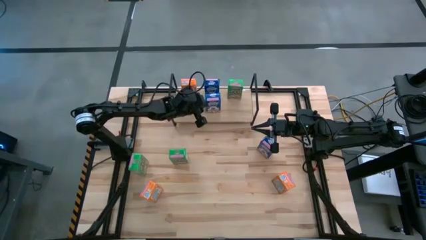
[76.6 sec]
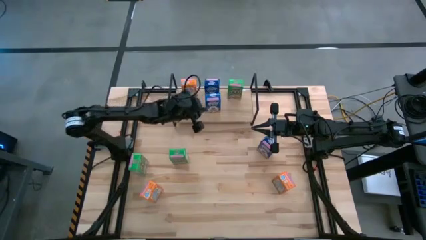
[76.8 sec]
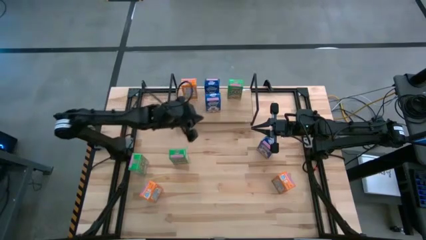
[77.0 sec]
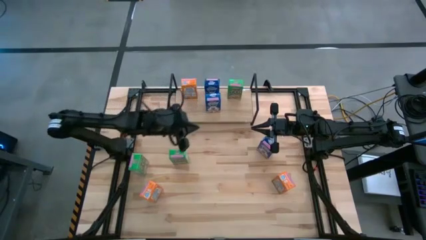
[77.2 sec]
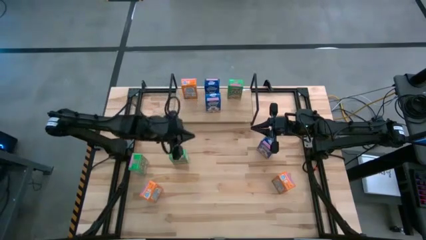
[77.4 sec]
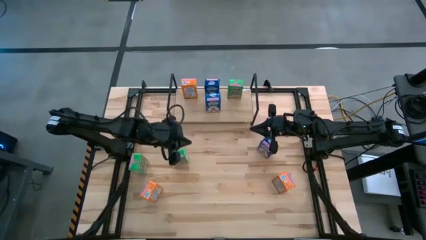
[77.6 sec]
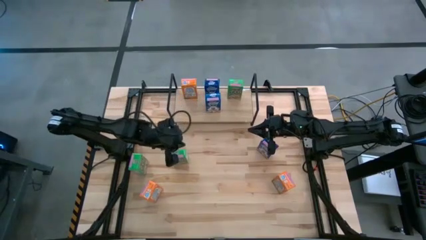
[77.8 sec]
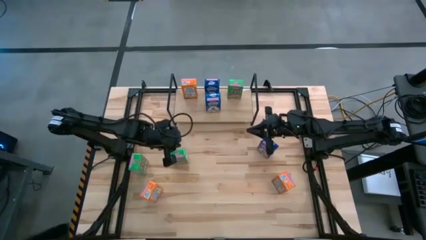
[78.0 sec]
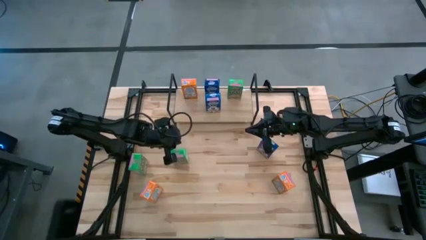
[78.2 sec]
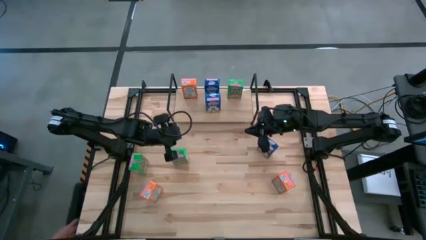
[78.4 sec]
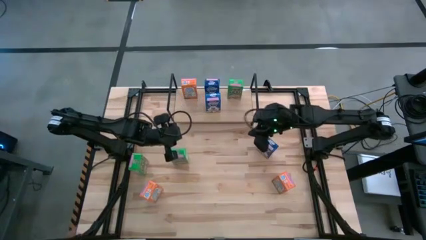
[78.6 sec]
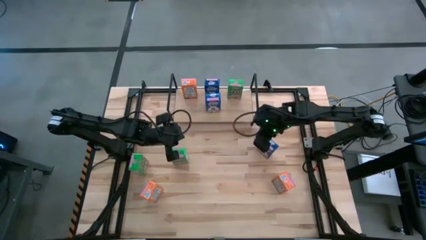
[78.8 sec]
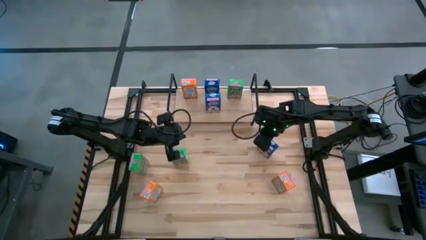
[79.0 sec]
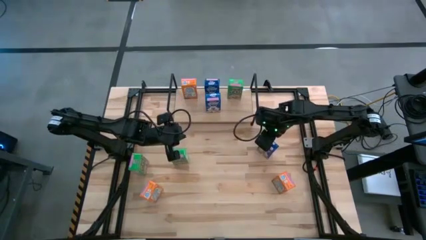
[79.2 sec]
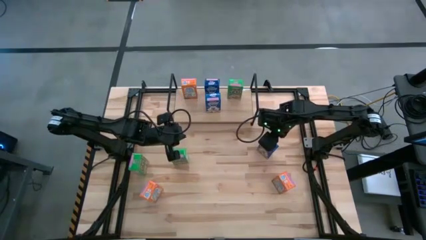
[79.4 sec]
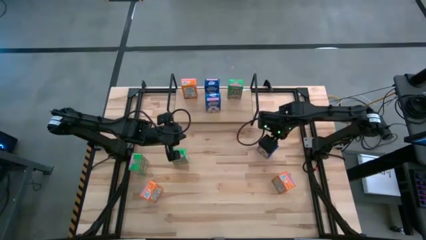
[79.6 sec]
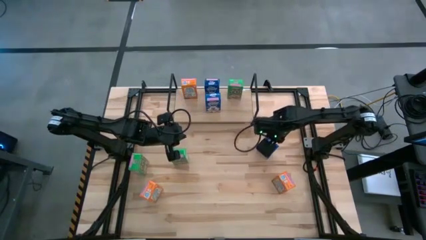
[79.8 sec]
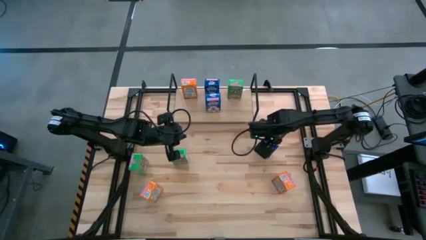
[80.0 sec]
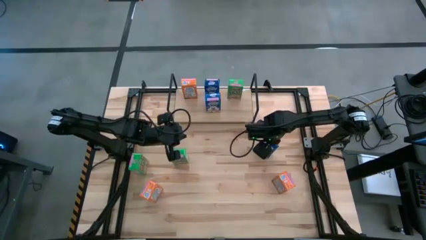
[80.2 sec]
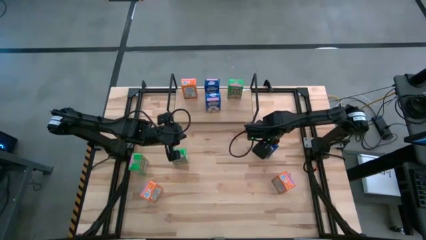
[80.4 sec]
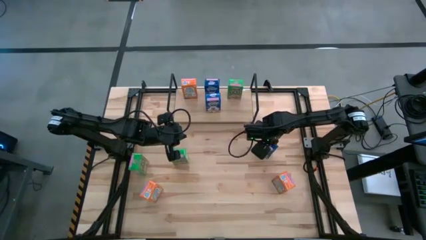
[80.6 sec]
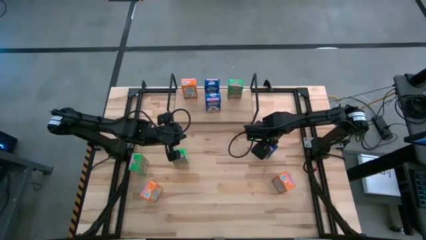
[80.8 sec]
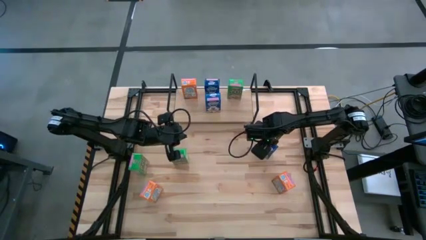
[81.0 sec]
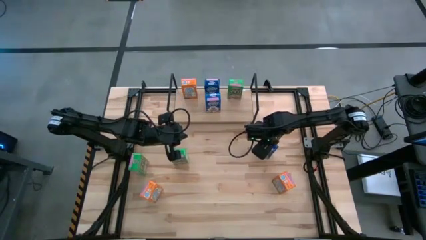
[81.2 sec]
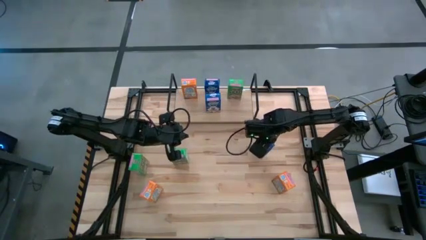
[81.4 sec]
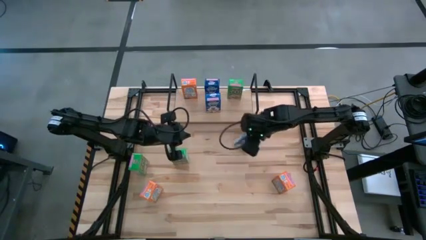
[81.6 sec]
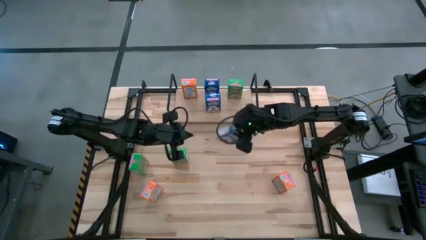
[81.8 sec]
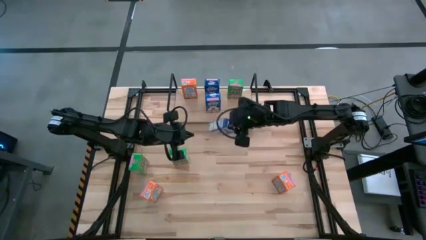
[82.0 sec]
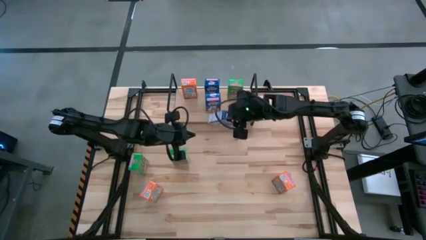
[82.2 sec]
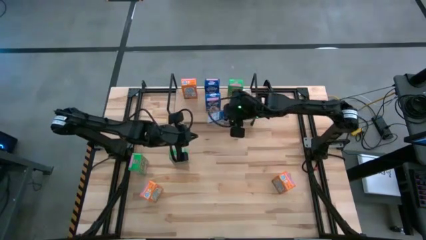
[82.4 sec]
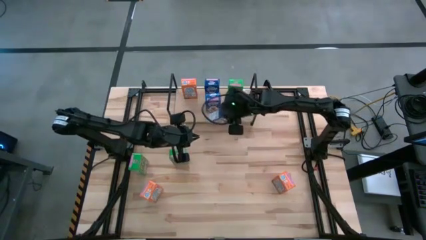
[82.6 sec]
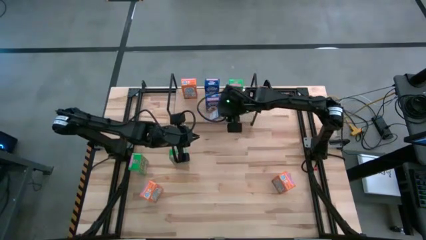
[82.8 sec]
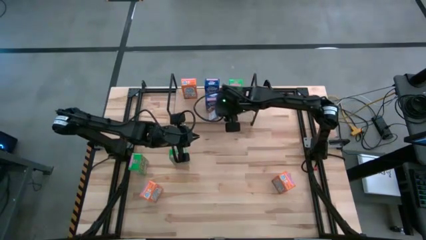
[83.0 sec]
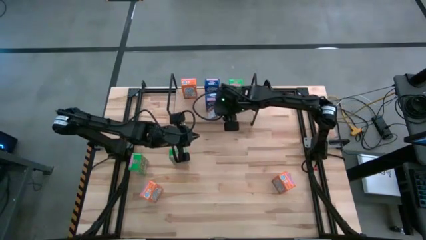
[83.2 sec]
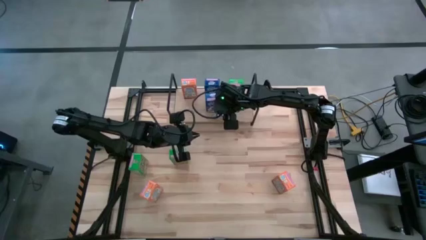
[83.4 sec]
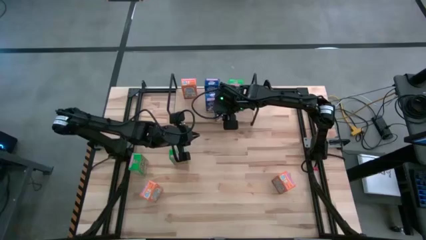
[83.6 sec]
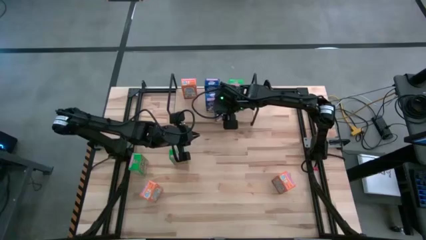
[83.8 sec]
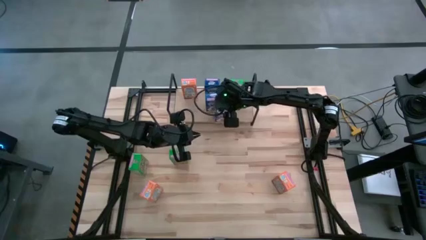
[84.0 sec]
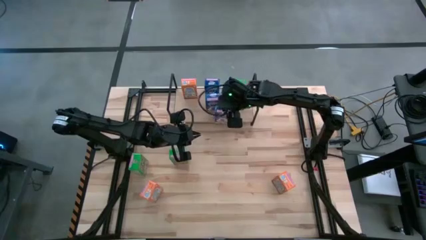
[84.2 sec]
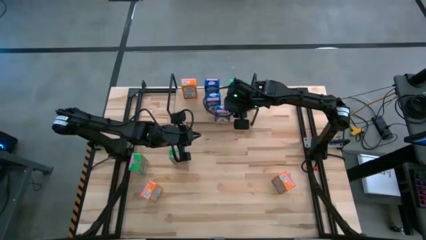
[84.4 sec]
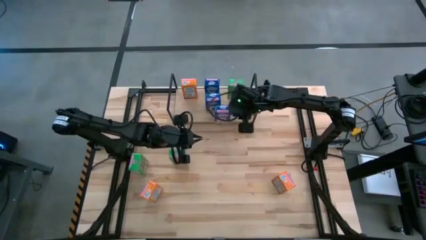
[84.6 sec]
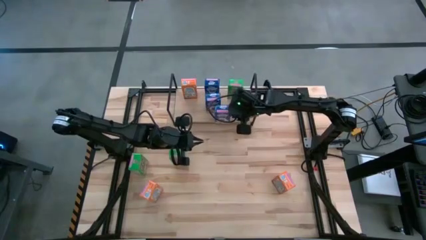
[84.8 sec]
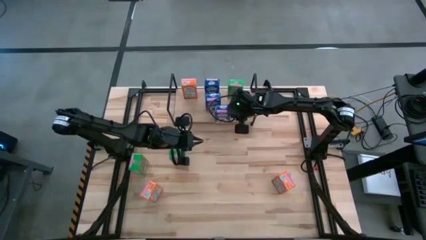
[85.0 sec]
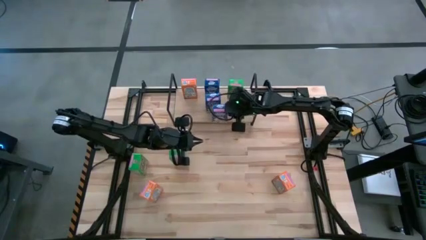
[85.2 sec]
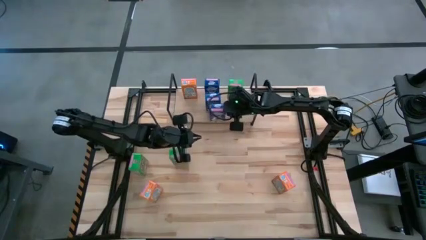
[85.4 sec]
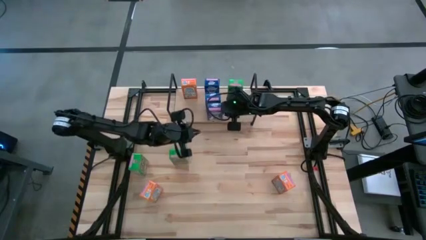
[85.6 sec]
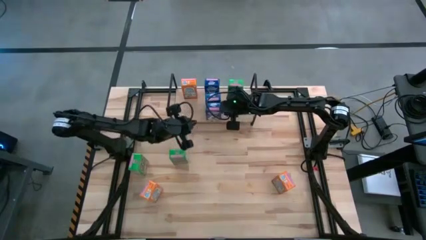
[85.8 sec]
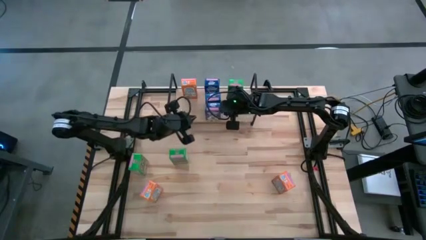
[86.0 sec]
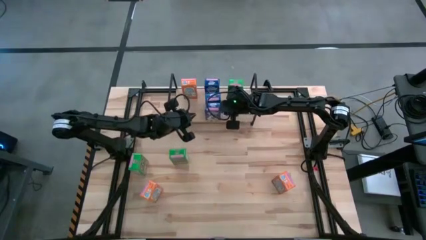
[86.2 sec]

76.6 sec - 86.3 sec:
Task: Stack cereal on shelf
Put the blue cereal box on the shelf

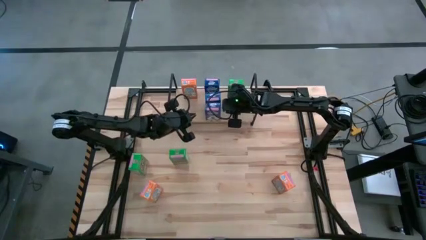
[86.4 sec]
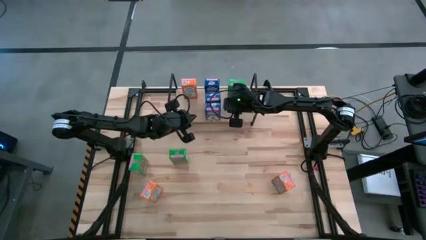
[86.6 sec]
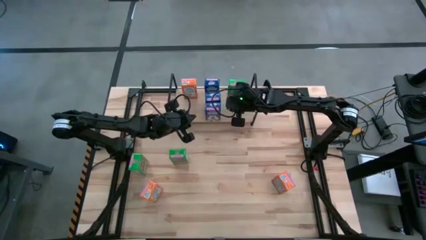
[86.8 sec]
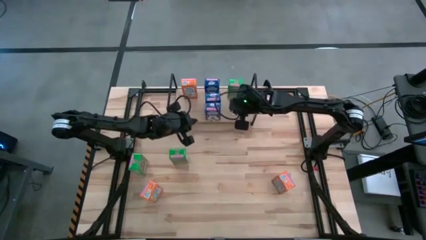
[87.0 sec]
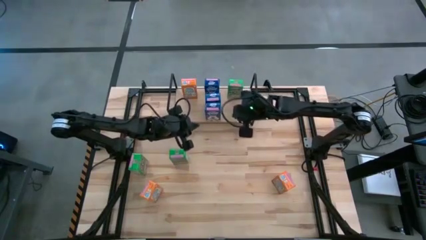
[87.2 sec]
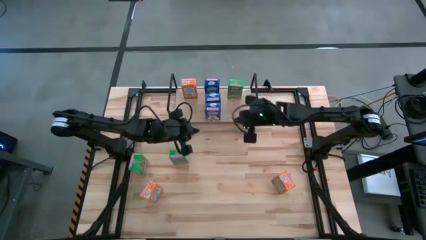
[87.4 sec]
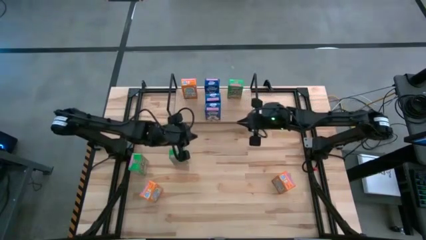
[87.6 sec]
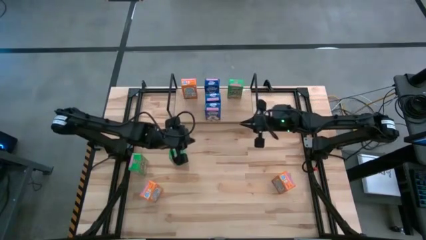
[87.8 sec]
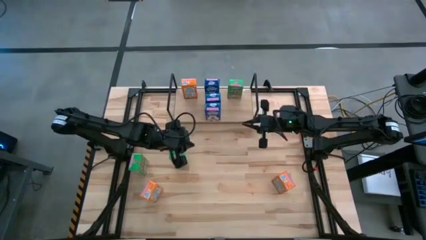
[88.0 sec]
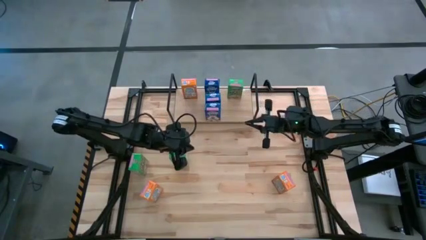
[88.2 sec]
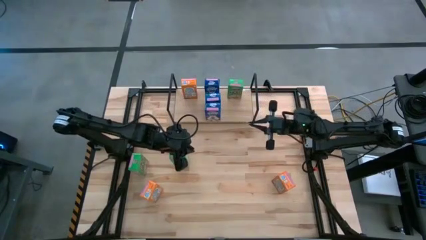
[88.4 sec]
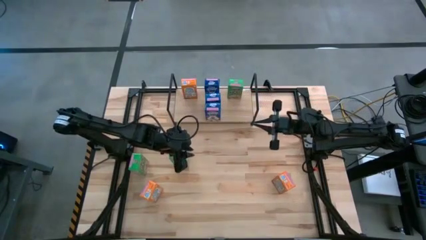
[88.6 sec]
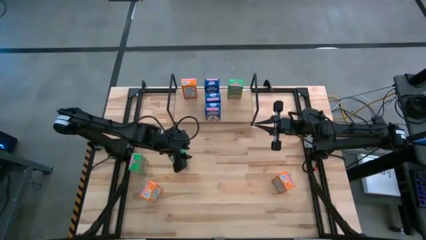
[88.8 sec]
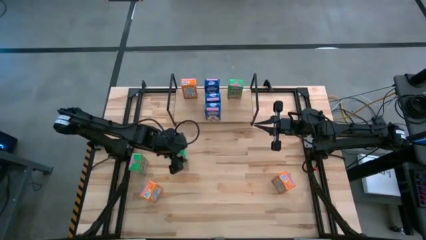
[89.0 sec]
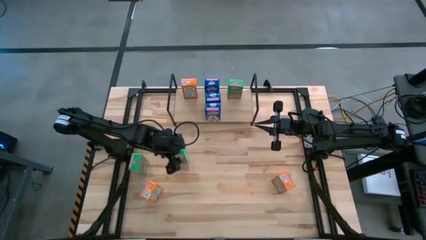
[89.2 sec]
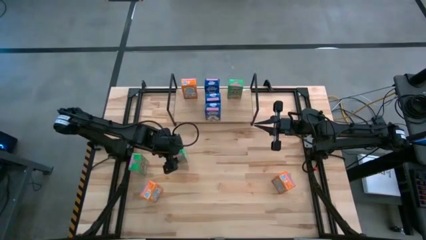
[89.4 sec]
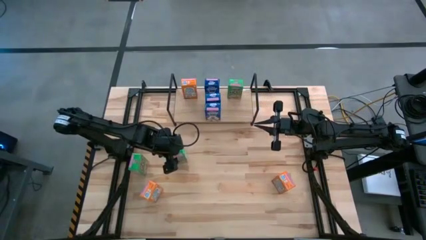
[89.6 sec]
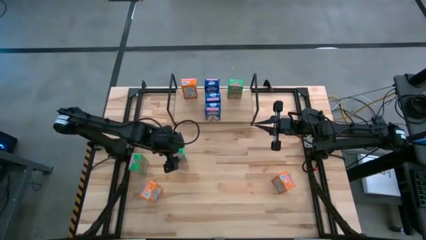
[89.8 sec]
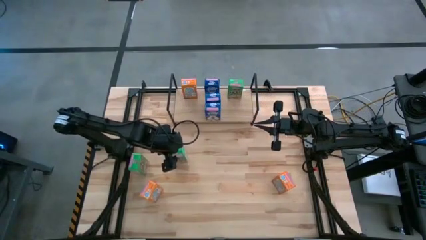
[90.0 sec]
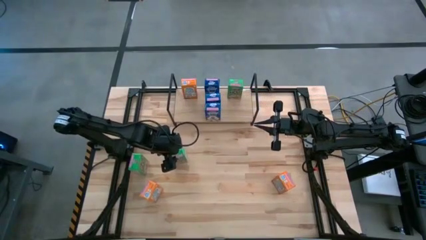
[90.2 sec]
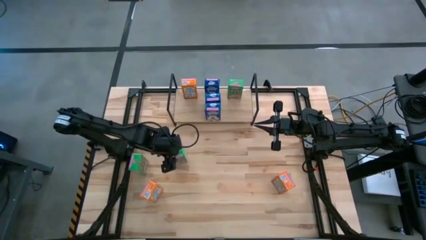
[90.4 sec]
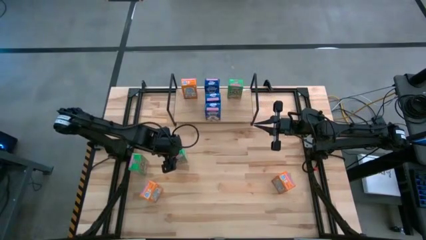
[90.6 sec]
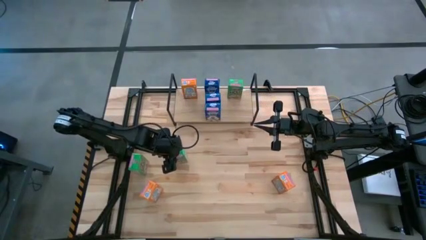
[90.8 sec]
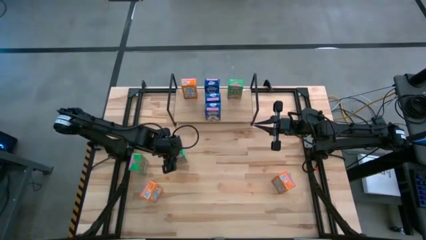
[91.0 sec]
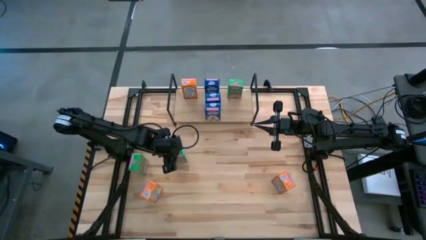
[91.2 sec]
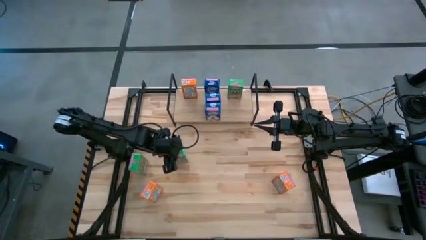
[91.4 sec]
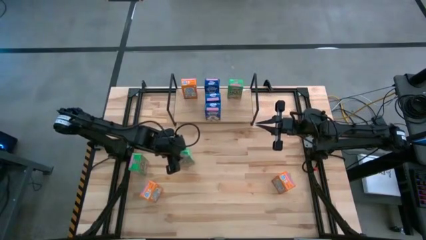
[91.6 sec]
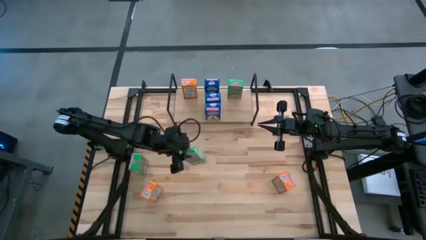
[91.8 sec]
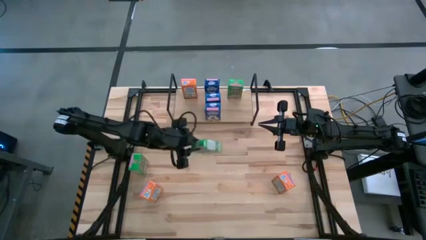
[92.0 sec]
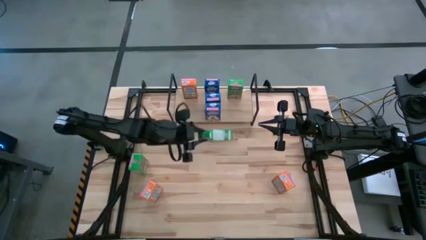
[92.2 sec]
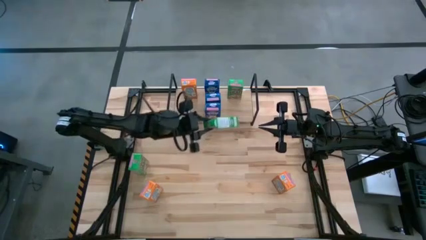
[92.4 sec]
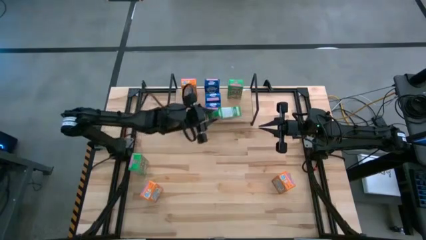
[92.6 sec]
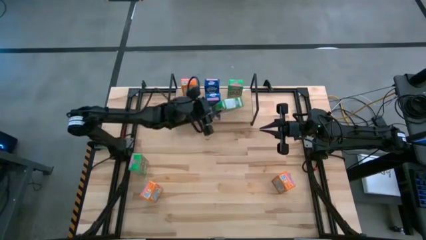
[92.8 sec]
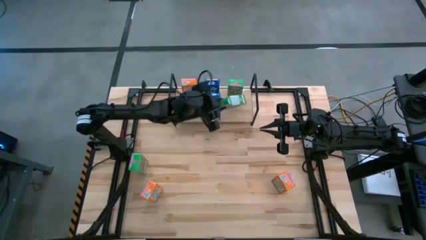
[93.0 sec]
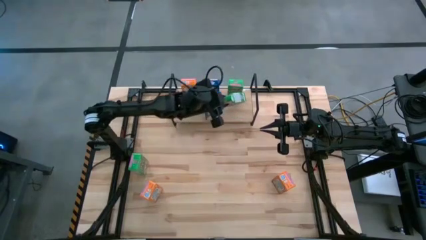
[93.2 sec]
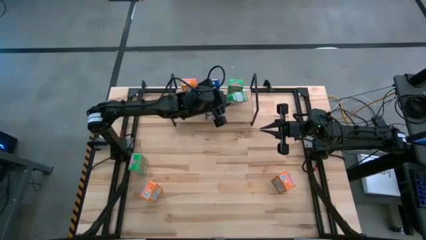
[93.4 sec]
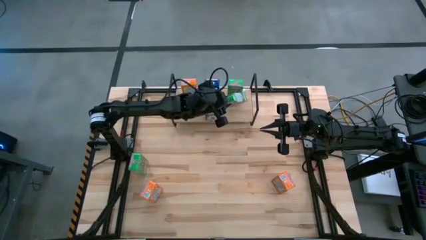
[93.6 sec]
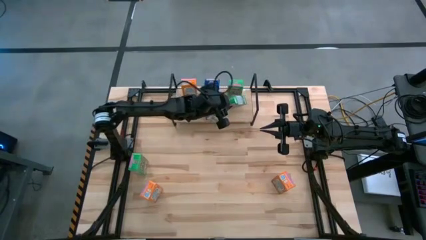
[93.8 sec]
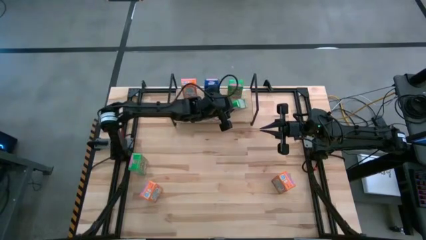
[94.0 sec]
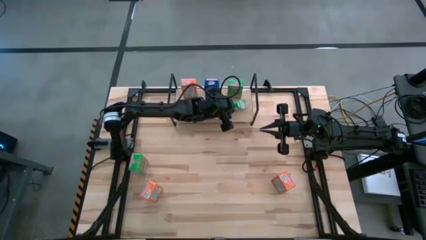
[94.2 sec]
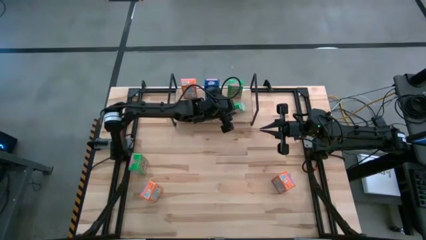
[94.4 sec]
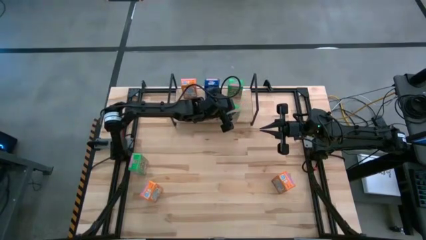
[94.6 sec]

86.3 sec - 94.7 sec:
Put the right green cereal box on the shelf
